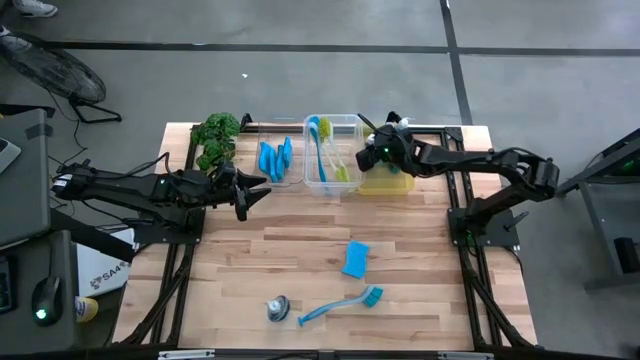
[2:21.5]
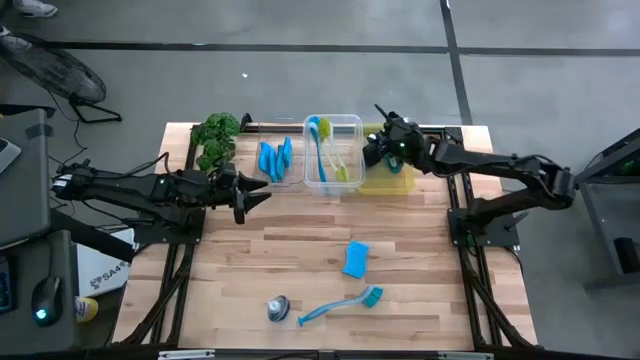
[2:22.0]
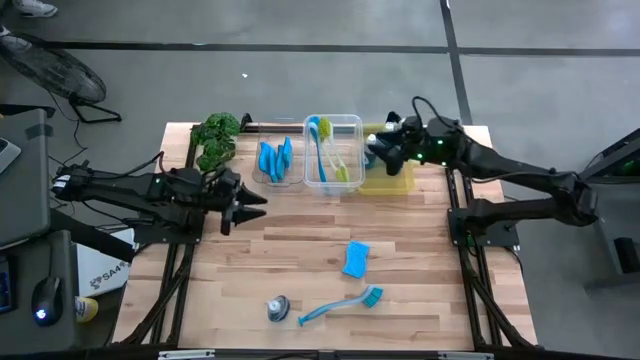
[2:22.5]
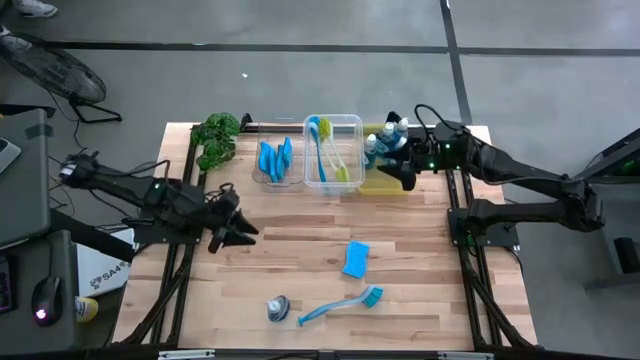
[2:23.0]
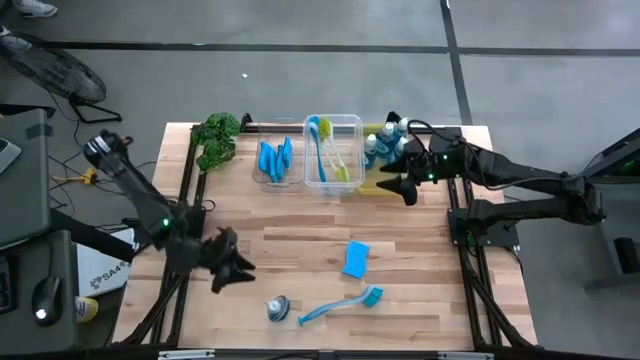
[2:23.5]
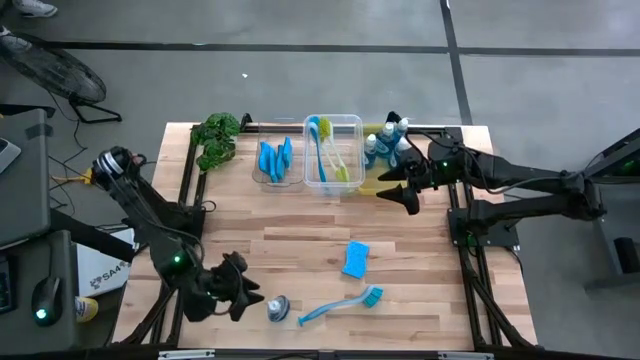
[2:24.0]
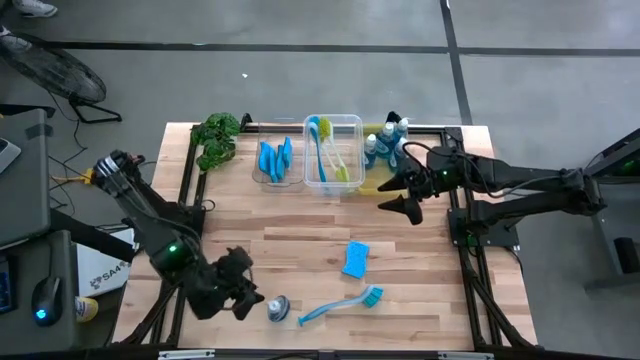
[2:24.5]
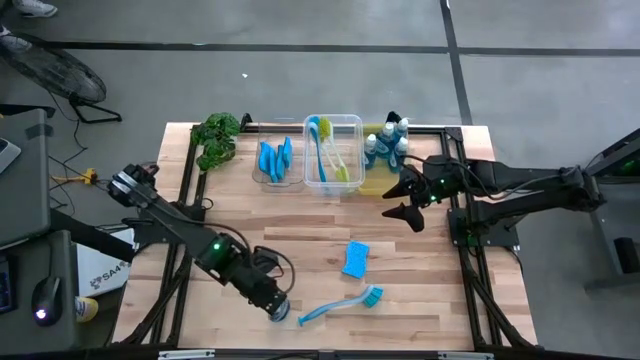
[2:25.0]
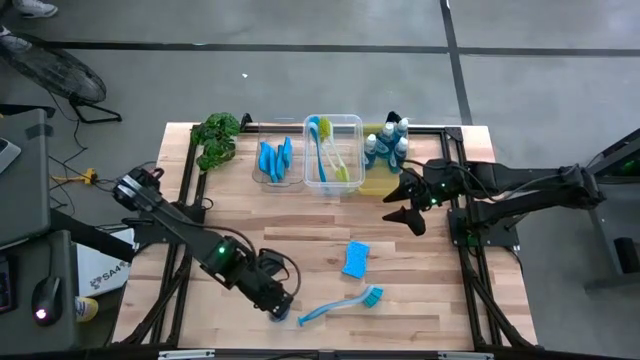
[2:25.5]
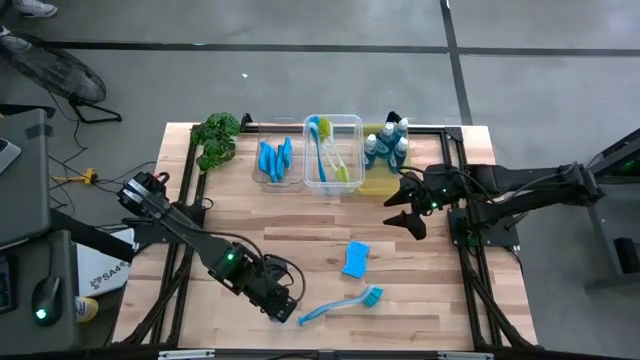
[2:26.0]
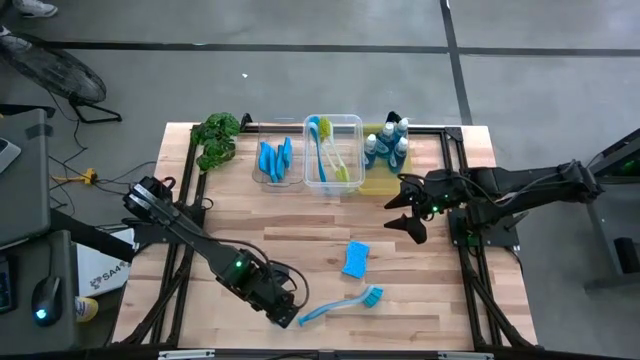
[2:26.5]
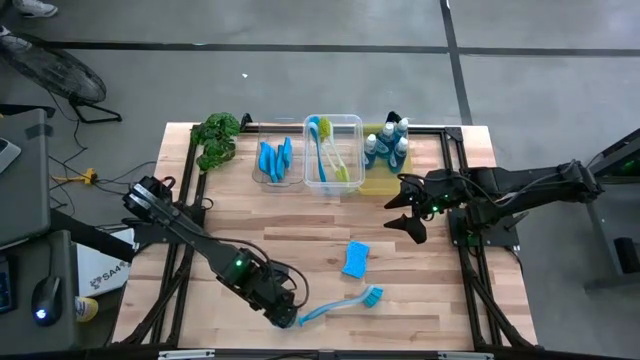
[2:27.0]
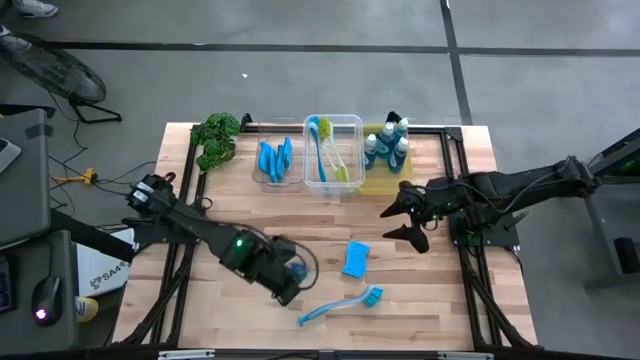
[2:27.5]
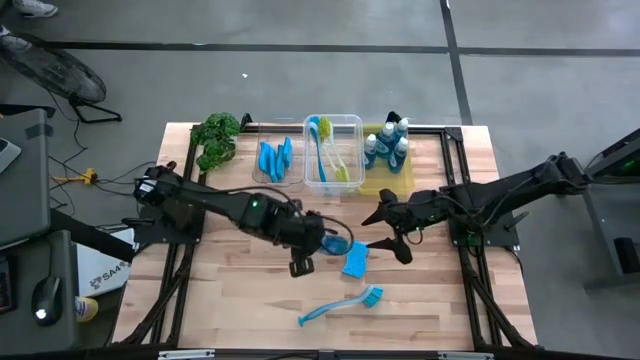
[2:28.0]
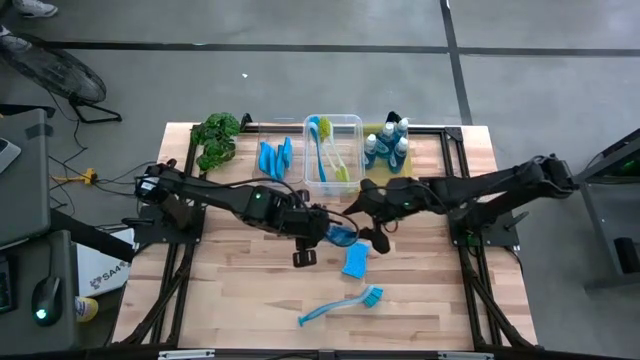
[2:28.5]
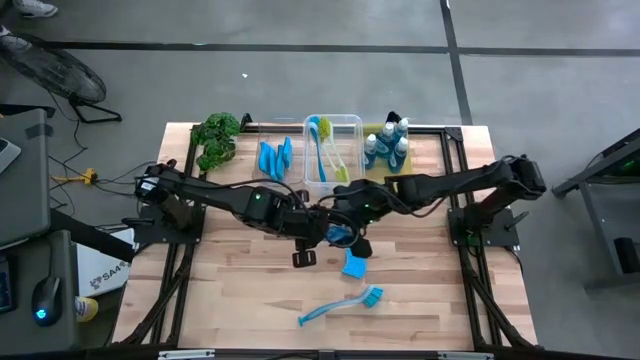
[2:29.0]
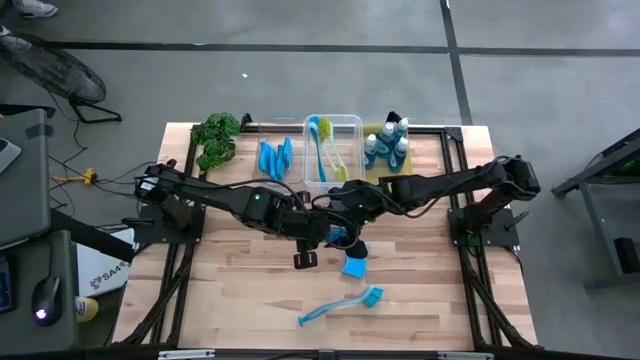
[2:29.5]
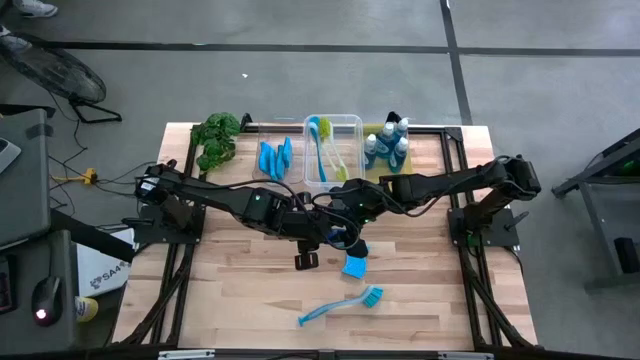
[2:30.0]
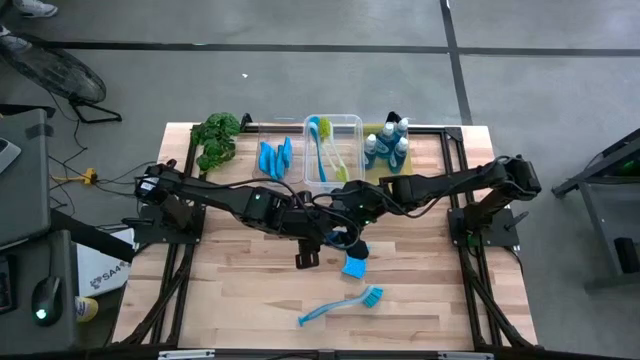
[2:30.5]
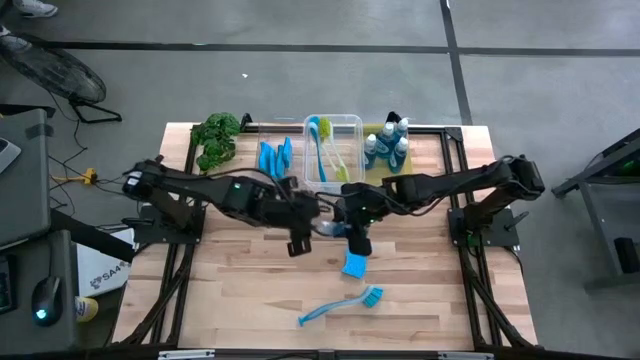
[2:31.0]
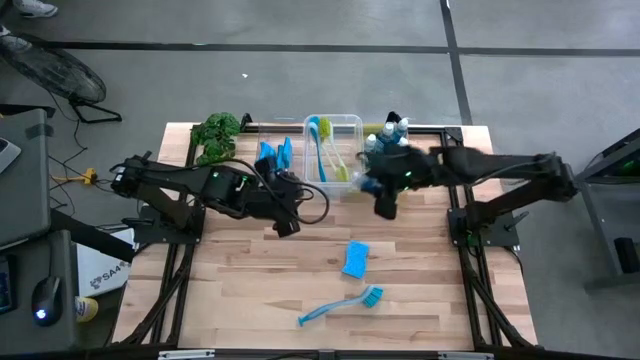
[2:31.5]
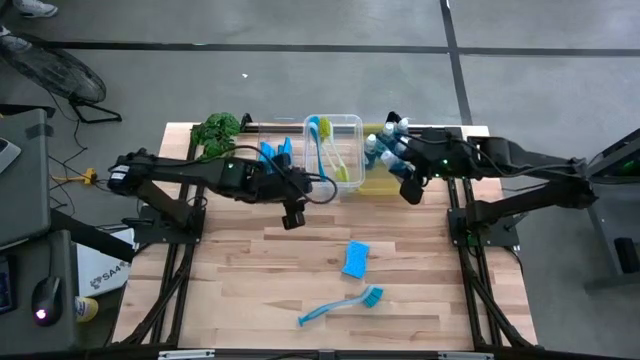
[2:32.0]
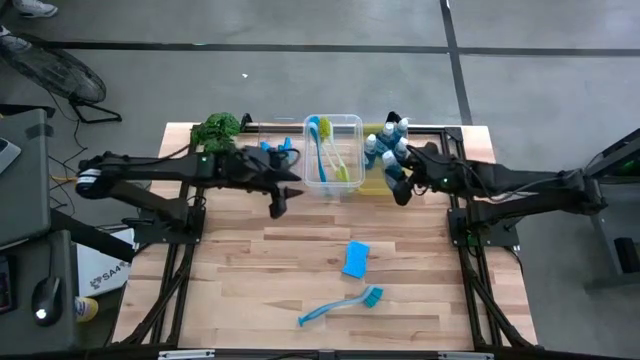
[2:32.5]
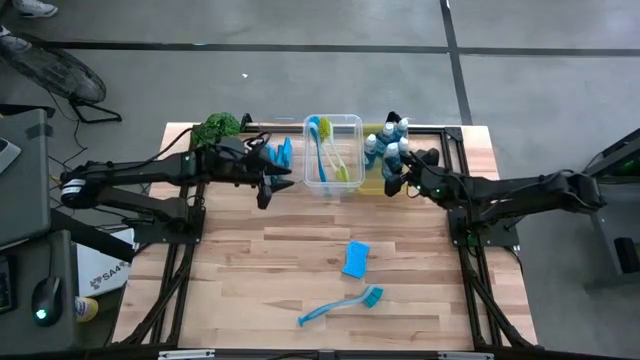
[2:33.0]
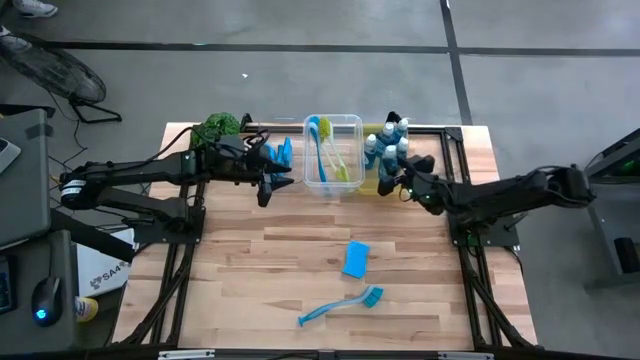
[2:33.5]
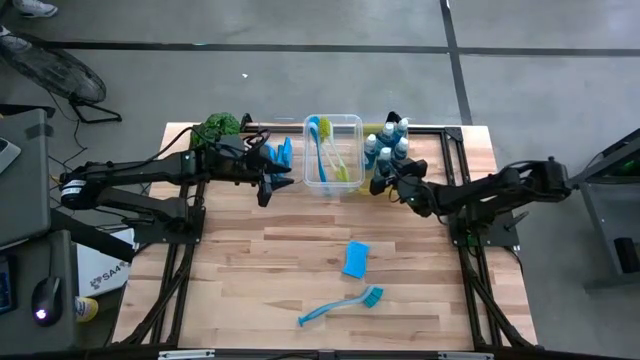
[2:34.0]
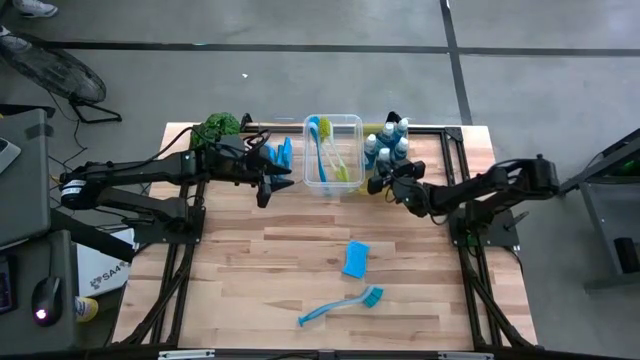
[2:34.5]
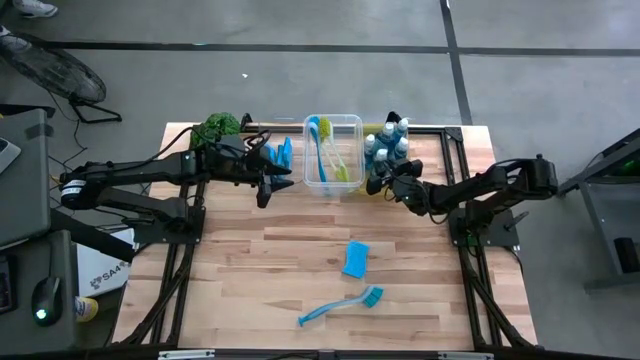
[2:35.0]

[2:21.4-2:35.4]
Task: Pick & Place Kitchen Sink Supplies
Put the dishwashing liquid into the yellow bin

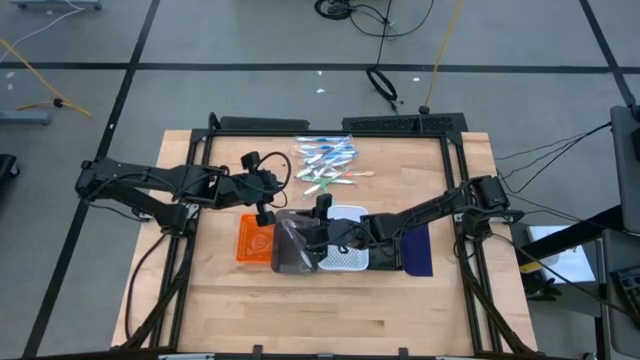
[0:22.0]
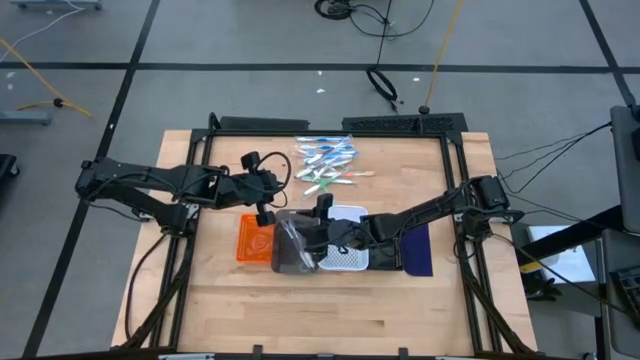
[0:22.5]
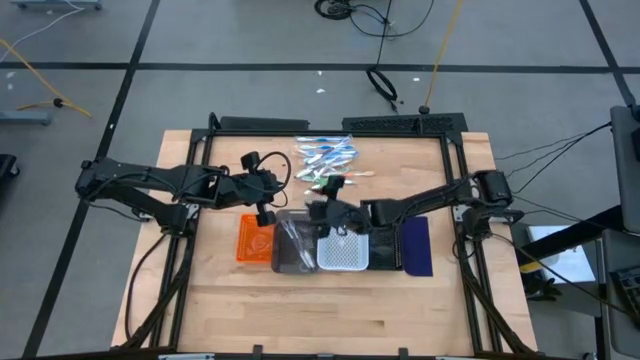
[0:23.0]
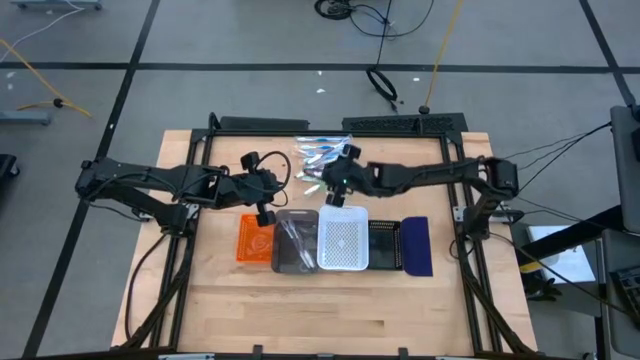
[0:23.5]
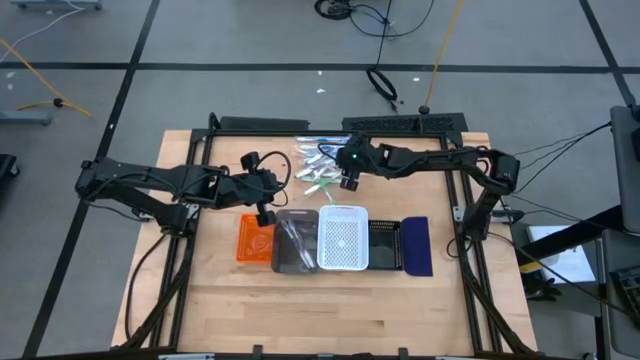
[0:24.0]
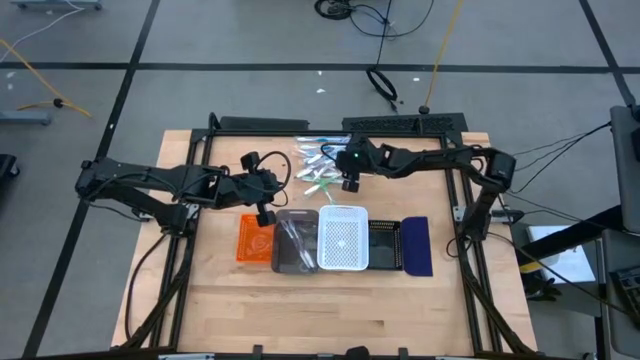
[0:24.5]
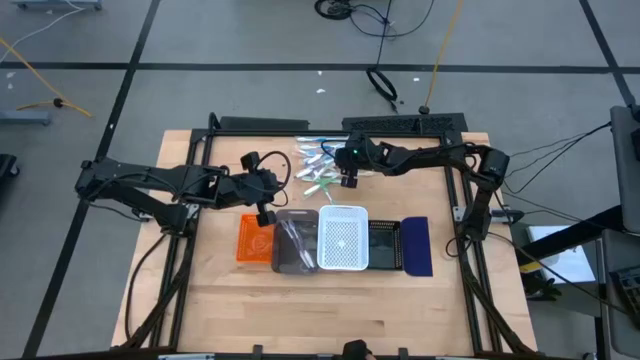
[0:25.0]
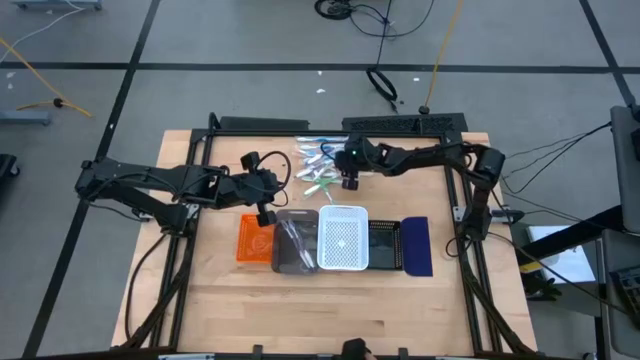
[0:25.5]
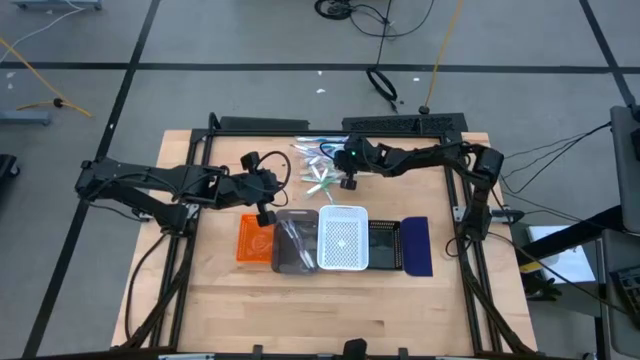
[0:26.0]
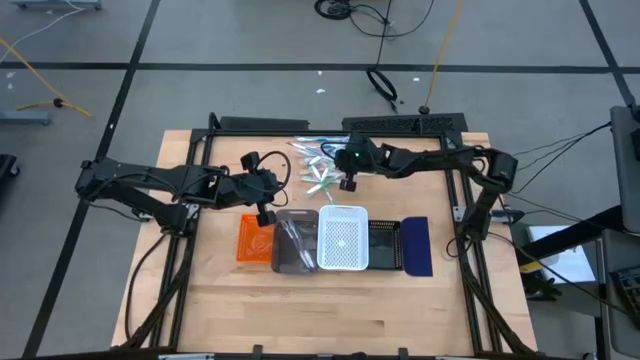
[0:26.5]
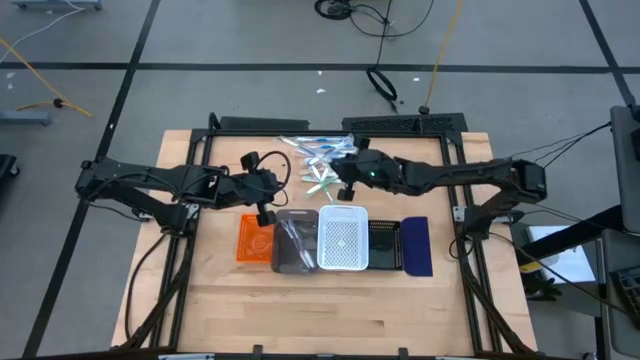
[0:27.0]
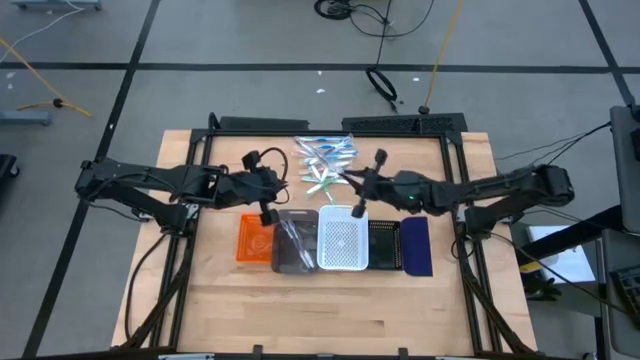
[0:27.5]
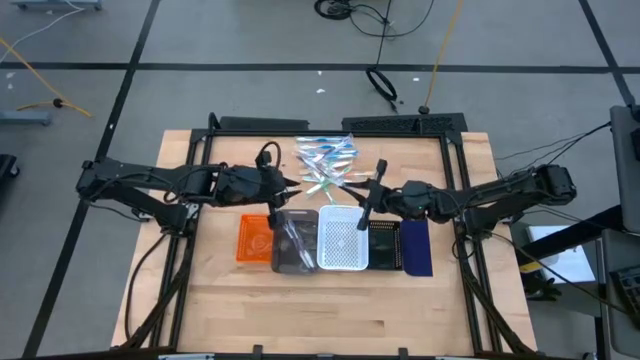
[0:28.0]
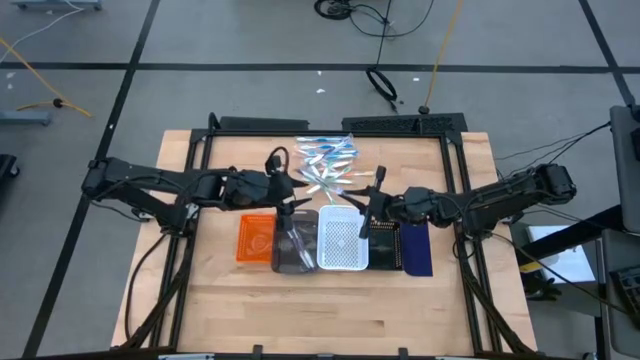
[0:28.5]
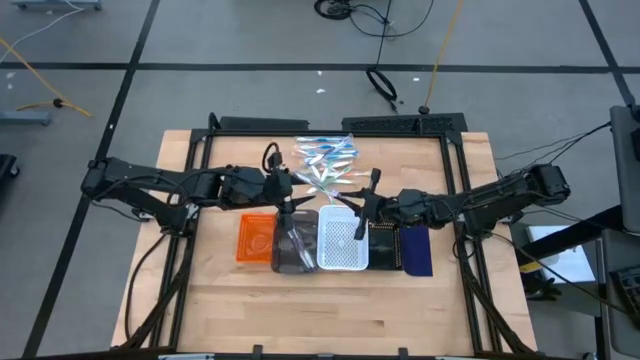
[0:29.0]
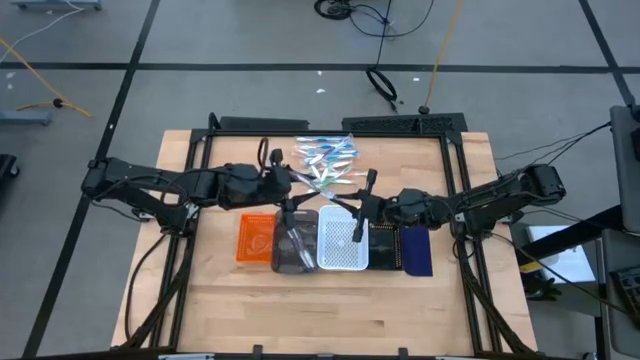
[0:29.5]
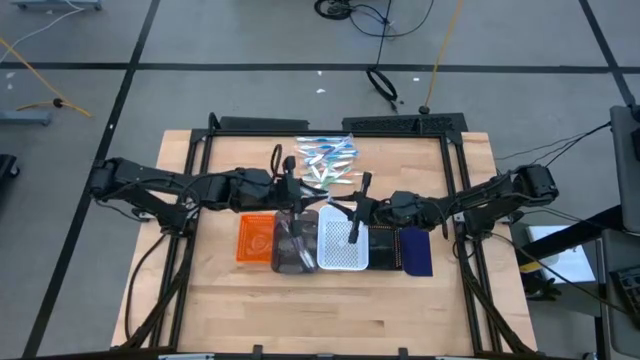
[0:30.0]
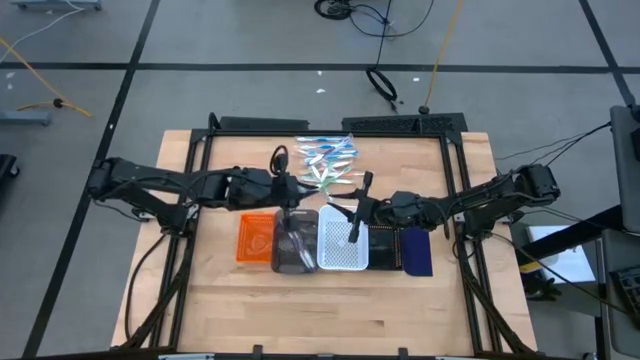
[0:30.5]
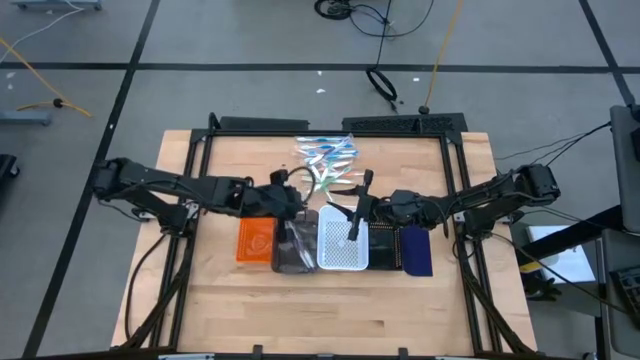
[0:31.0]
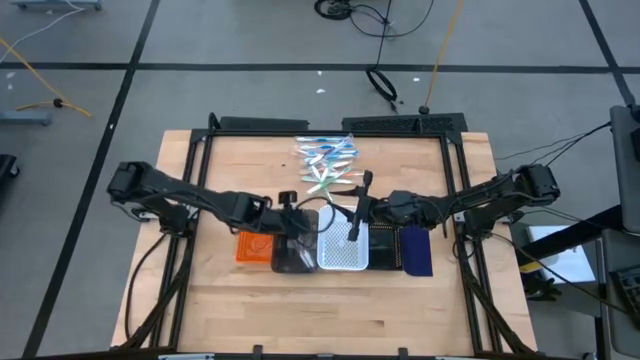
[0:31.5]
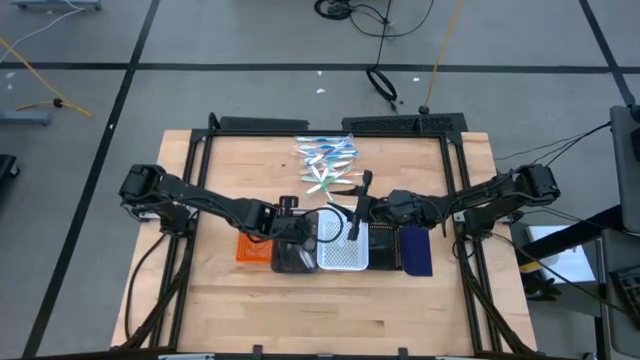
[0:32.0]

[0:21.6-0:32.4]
Task: Pick & Place Toothbrushes
Put the purple toothbrush into the left black bin
